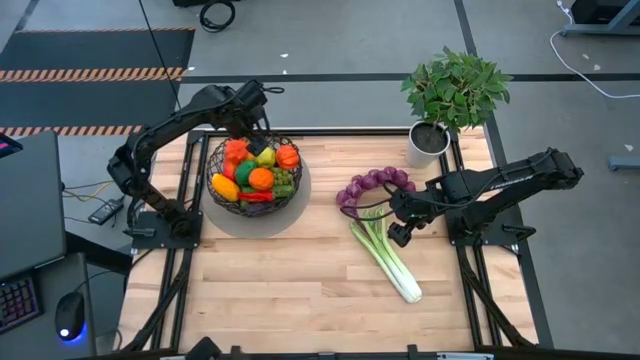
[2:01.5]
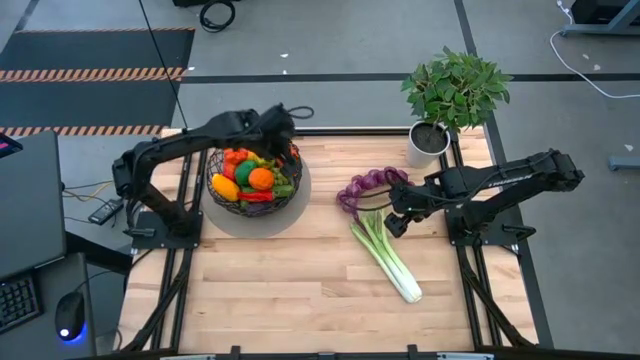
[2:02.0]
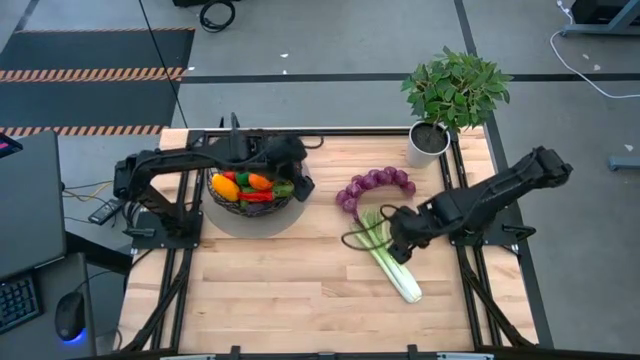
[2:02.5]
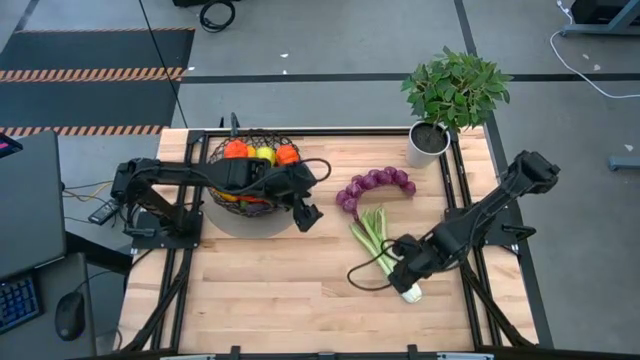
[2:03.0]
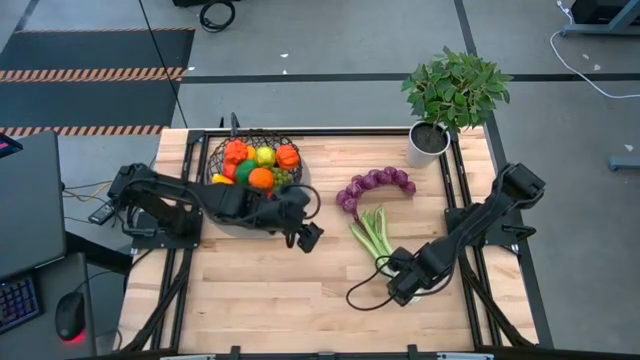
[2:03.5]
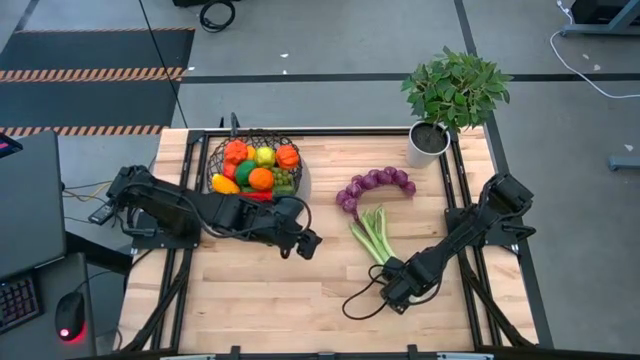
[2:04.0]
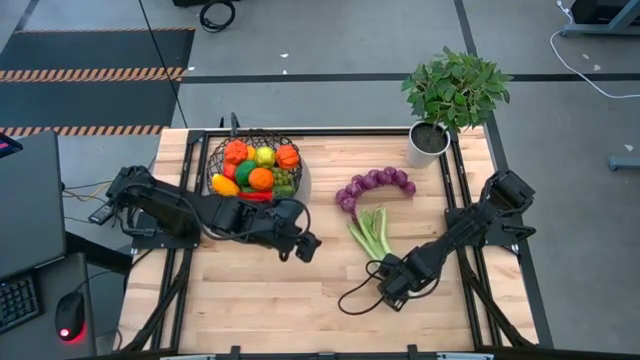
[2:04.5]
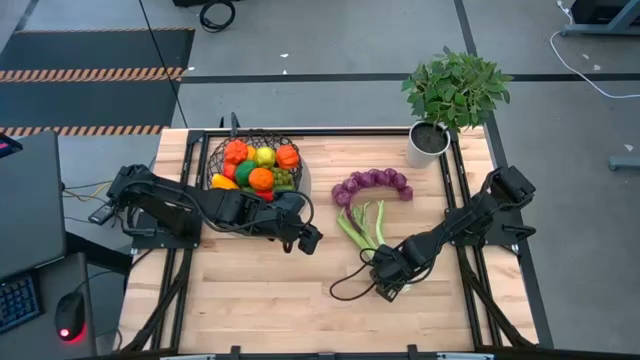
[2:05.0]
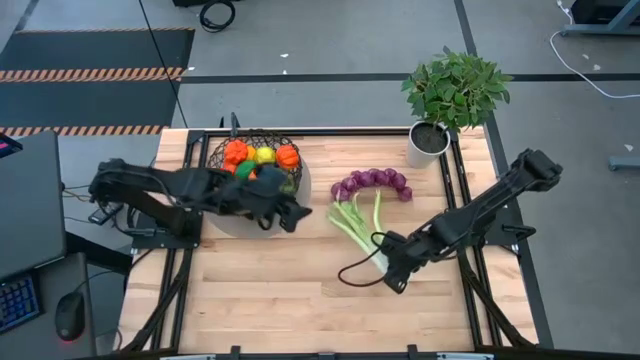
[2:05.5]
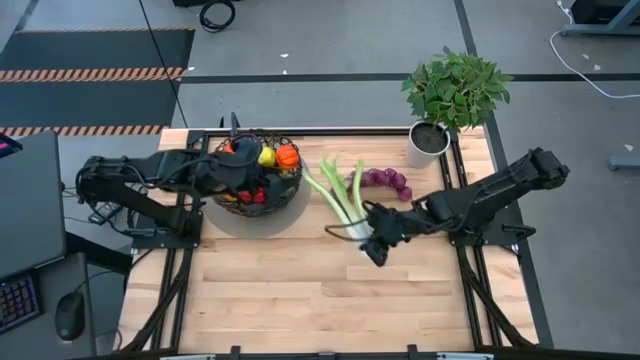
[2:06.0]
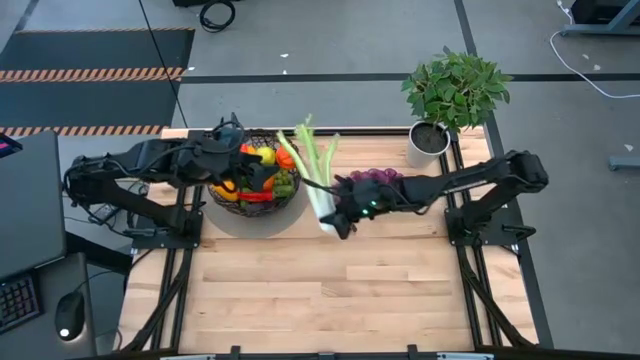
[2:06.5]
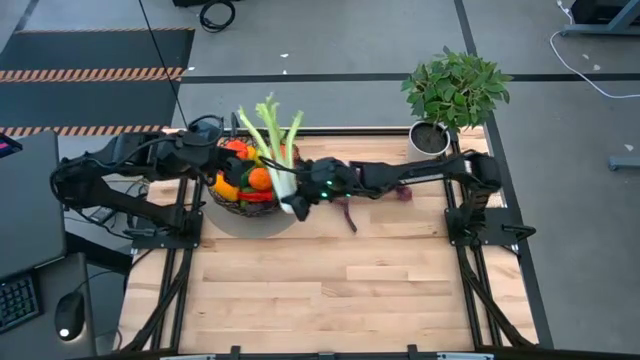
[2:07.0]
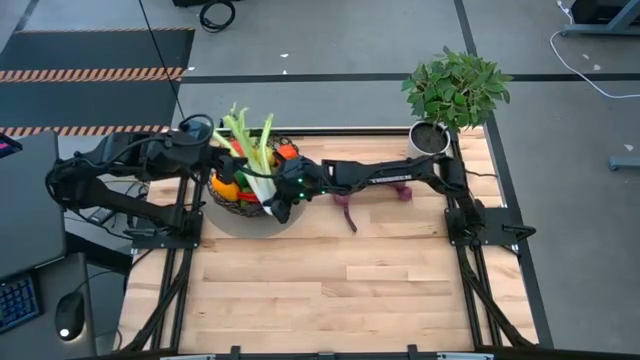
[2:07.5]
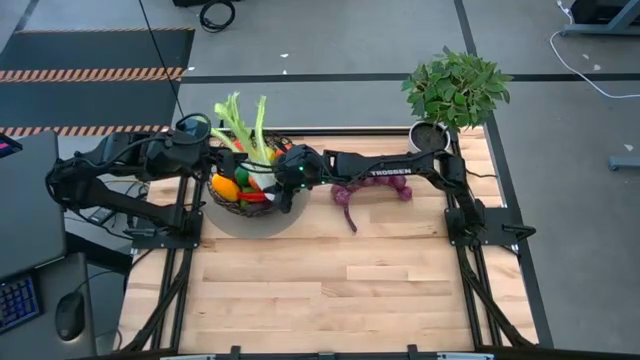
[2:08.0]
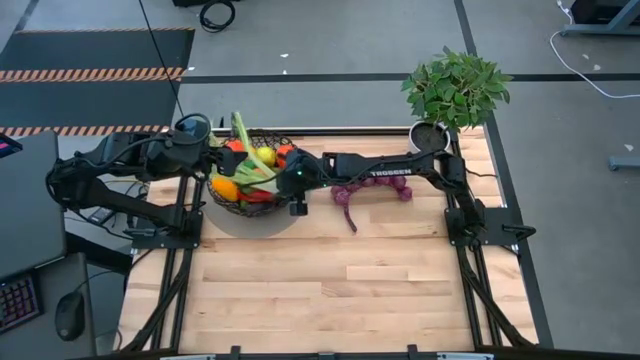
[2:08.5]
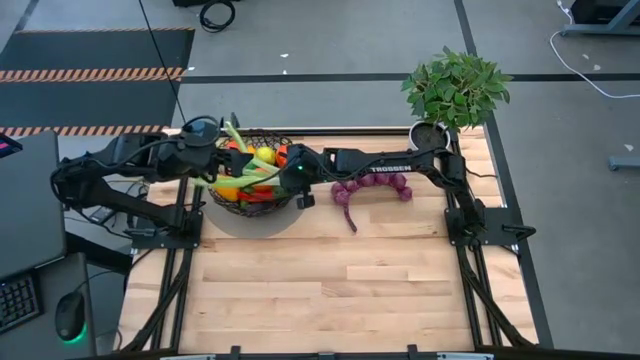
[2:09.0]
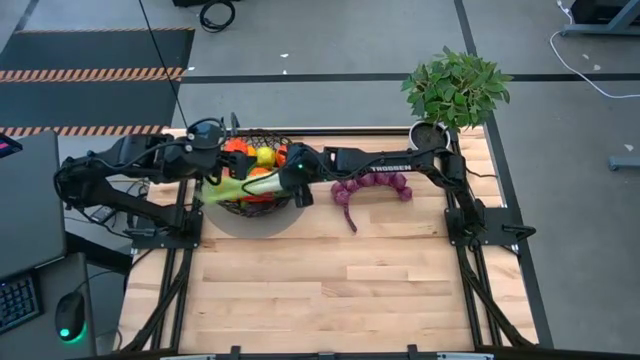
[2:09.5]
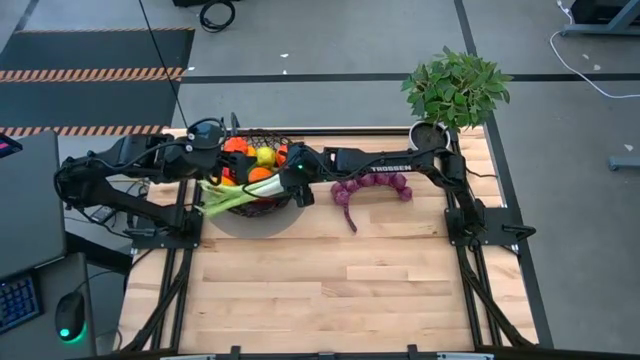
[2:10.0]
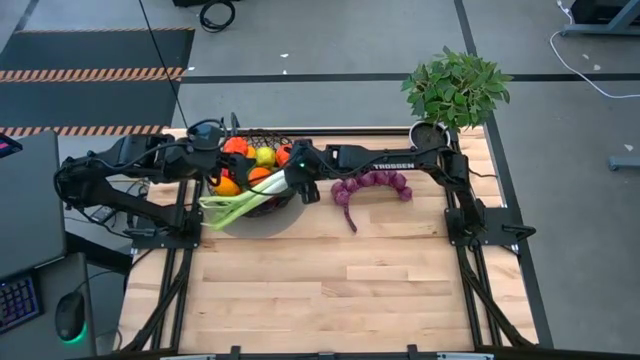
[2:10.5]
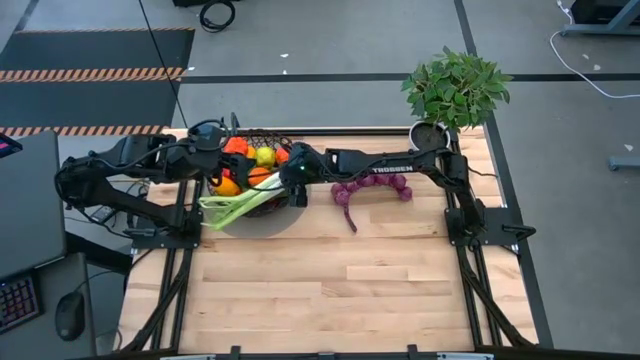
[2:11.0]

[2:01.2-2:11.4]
Task: Build produce basket
Put the green celery into the black wire basket

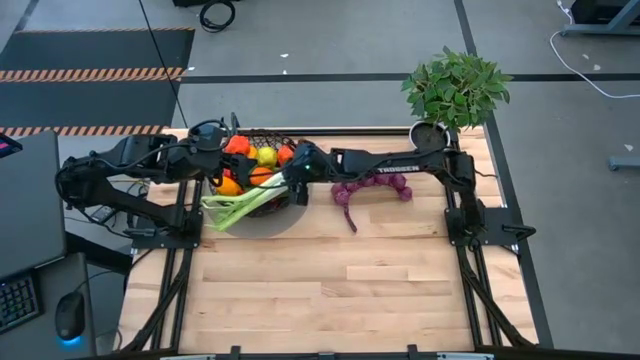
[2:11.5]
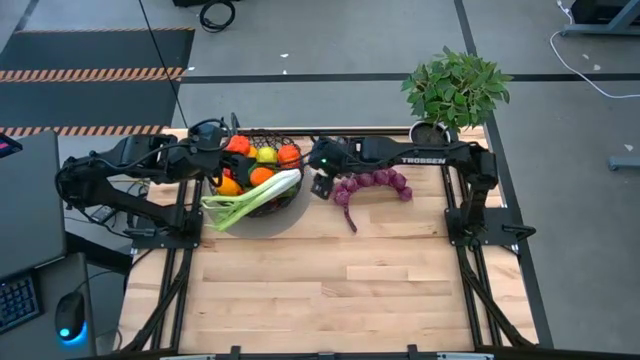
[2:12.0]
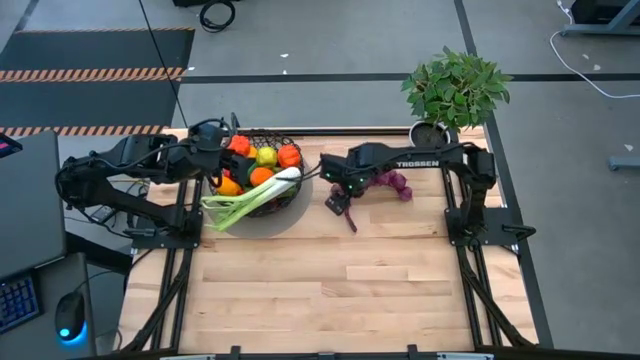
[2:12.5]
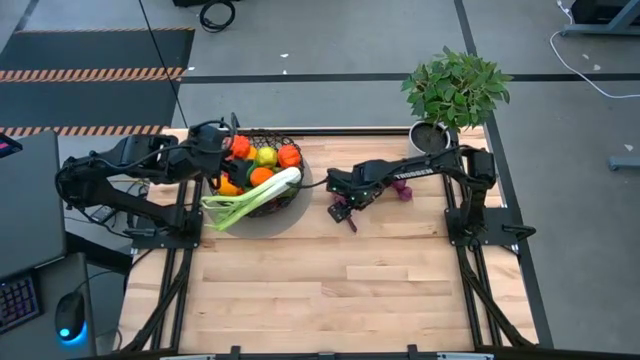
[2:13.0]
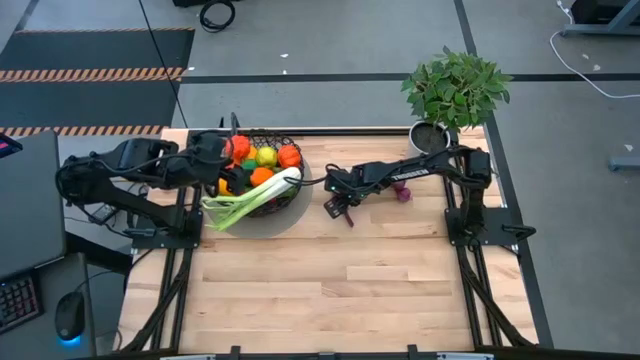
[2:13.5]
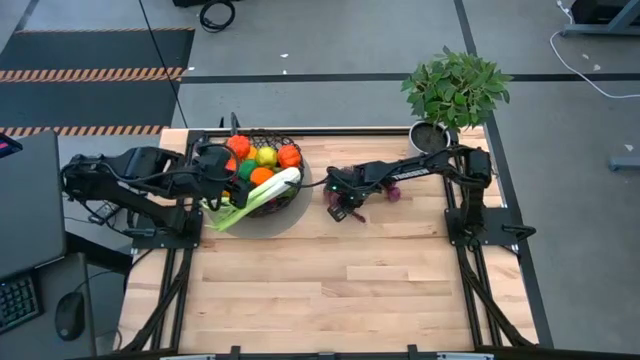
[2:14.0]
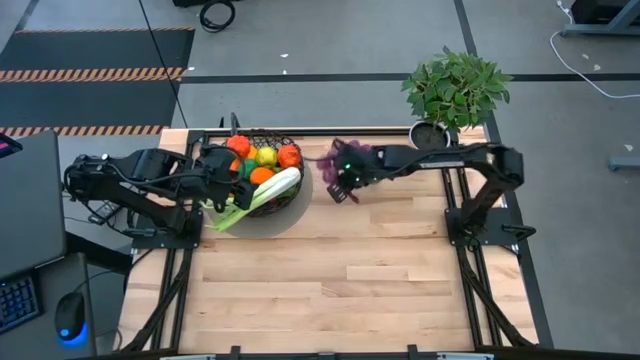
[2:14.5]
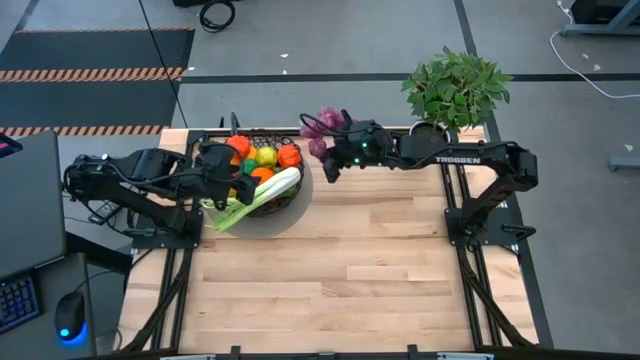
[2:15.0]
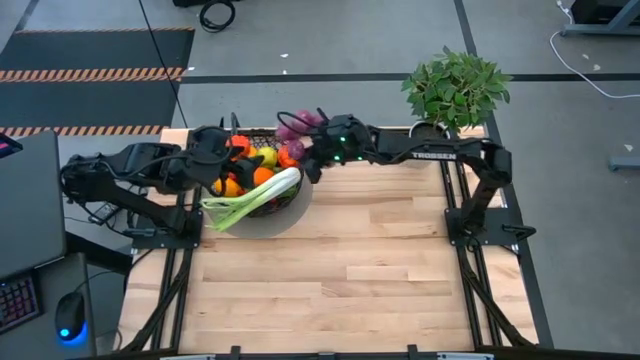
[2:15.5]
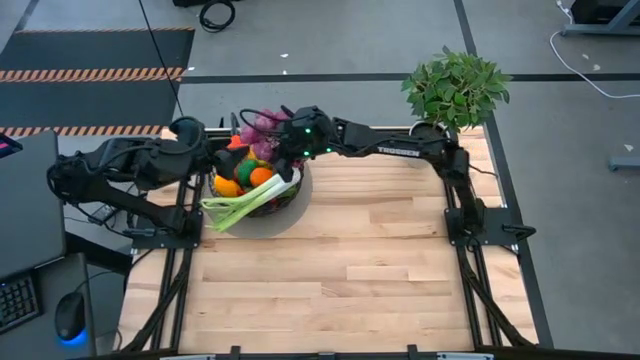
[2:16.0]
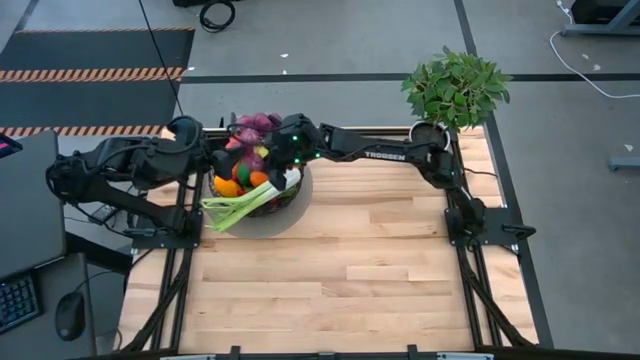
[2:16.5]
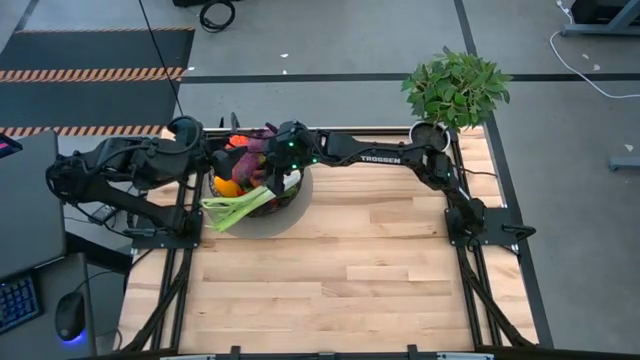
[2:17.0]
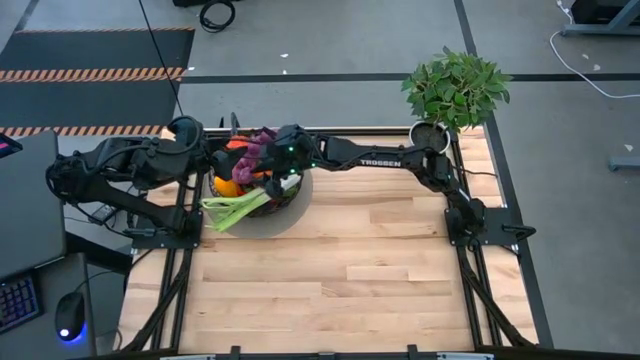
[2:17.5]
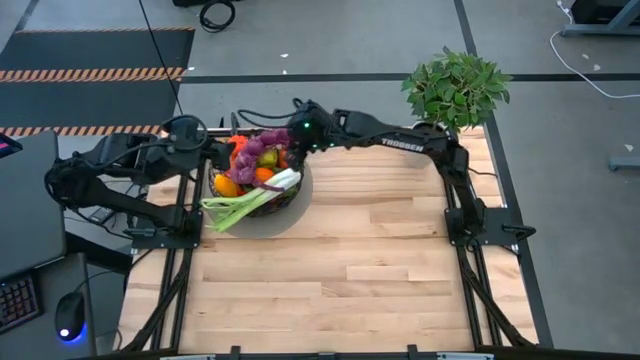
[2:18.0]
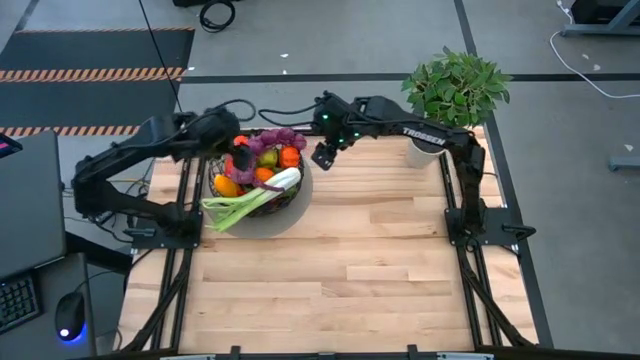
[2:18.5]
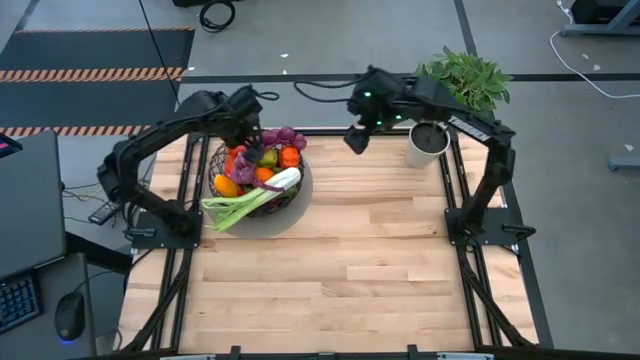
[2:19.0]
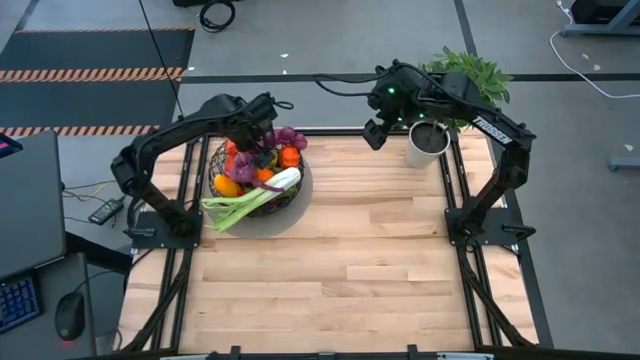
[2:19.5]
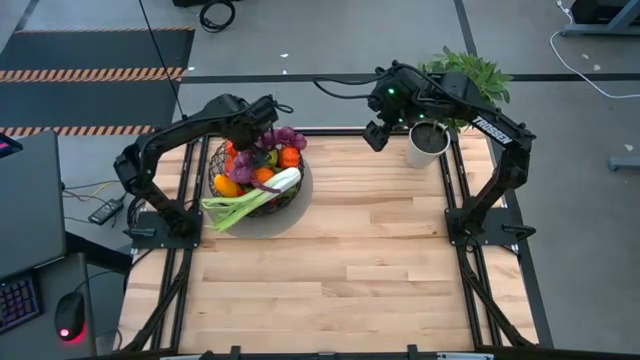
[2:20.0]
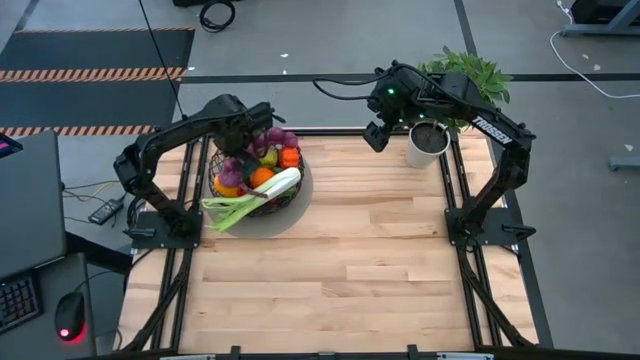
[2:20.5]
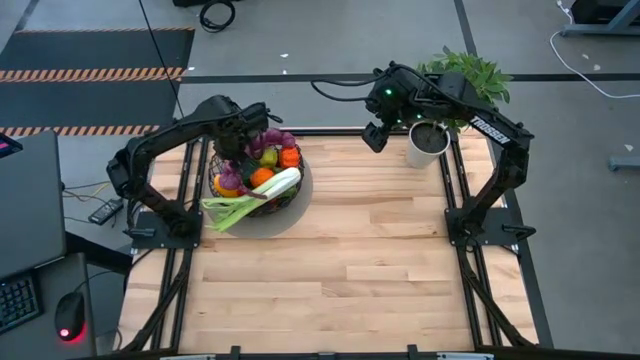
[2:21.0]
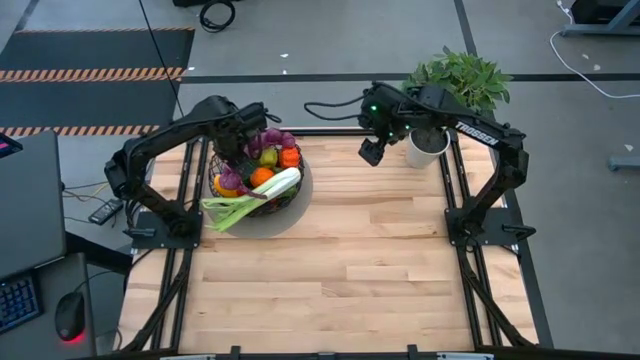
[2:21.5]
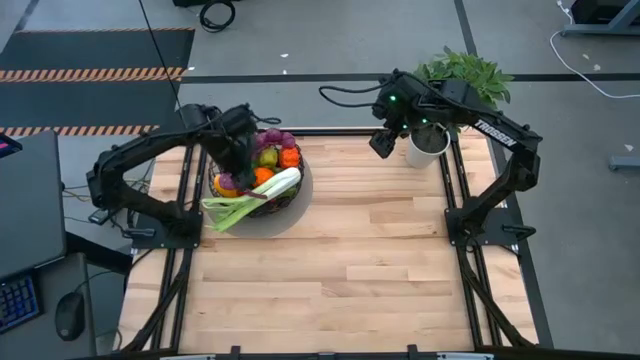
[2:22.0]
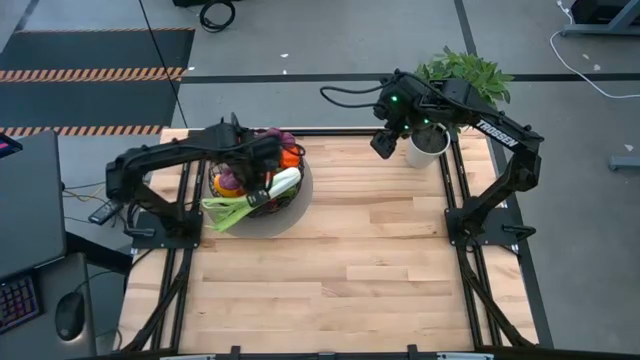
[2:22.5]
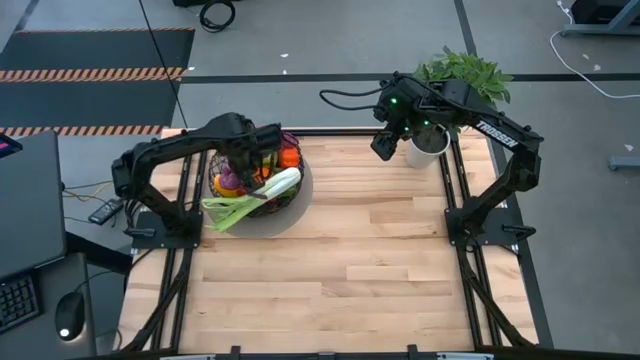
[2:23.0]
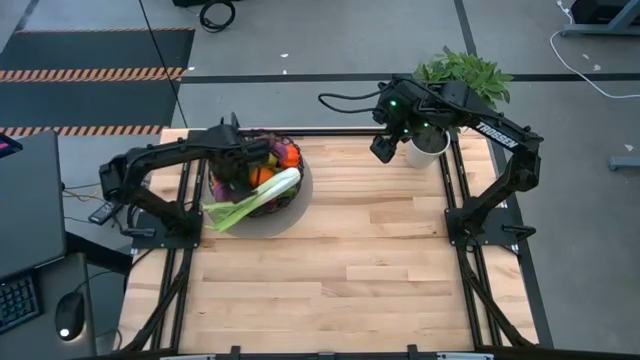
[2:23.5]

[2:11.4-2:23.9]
Put the purple garlic into the black wire basket
